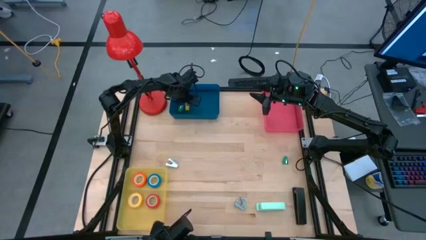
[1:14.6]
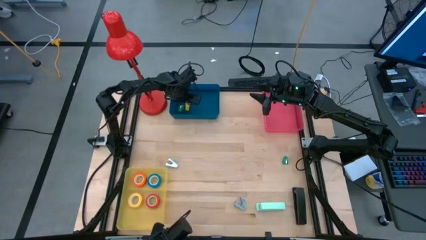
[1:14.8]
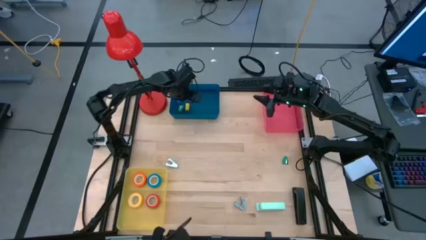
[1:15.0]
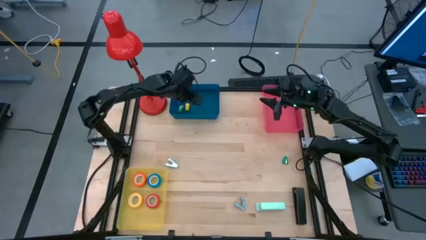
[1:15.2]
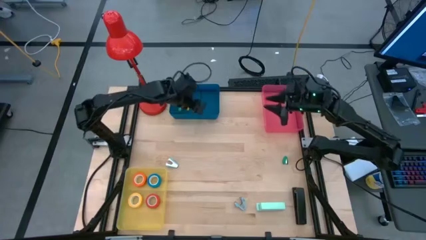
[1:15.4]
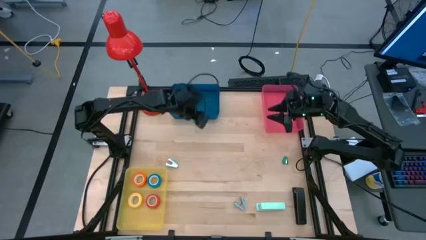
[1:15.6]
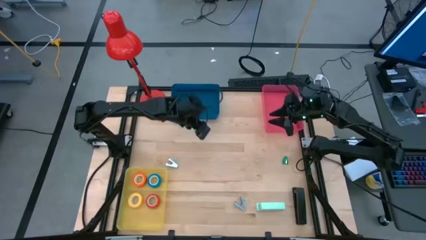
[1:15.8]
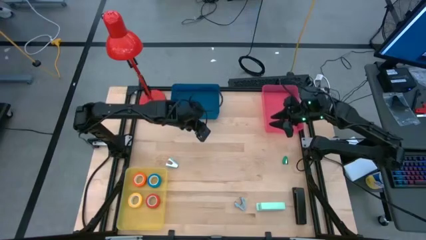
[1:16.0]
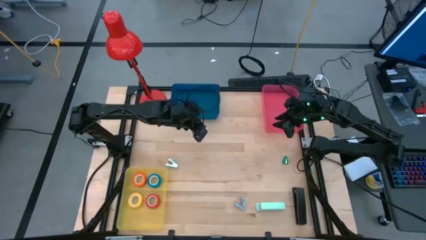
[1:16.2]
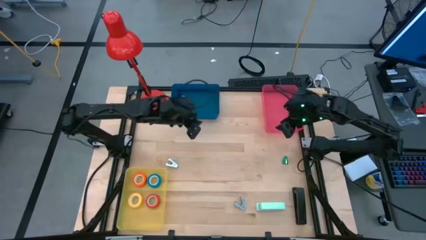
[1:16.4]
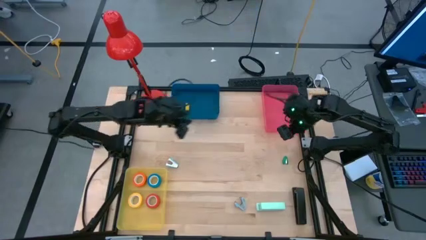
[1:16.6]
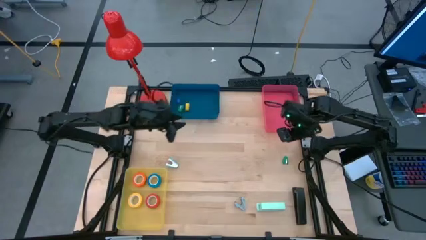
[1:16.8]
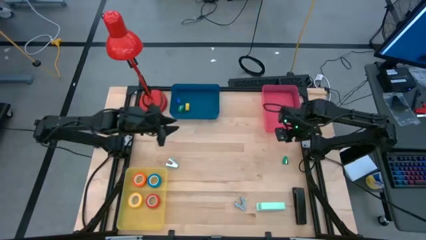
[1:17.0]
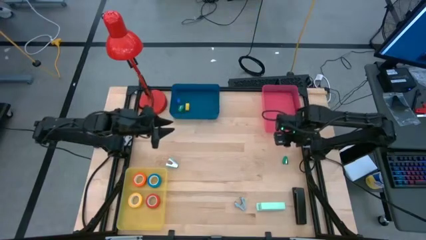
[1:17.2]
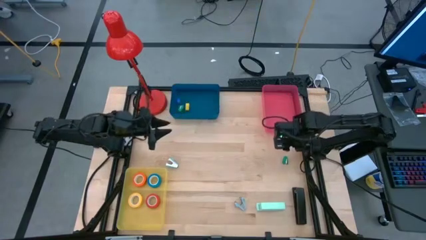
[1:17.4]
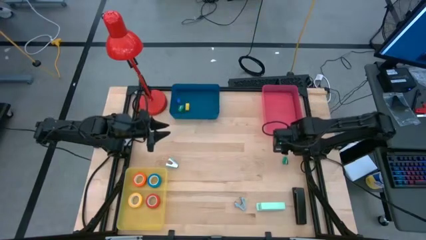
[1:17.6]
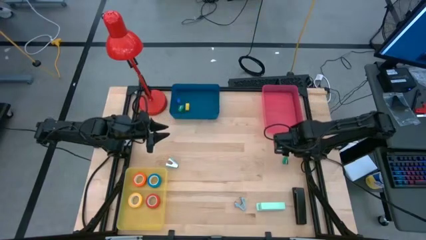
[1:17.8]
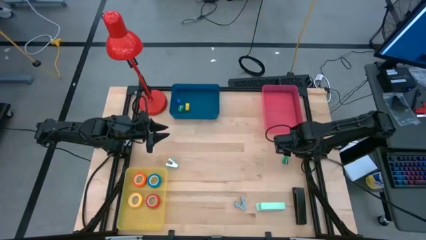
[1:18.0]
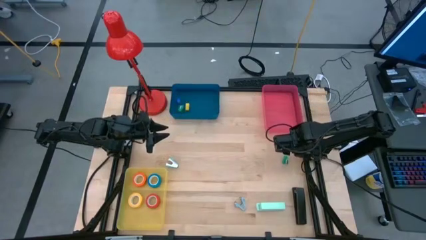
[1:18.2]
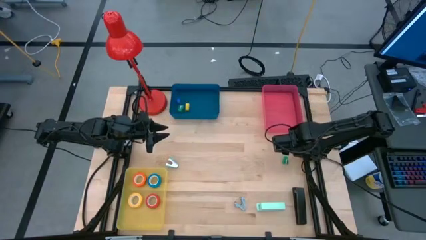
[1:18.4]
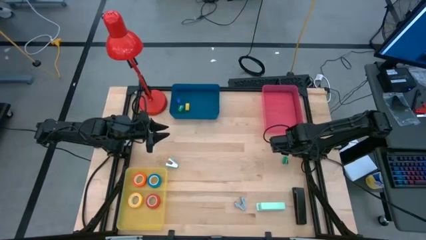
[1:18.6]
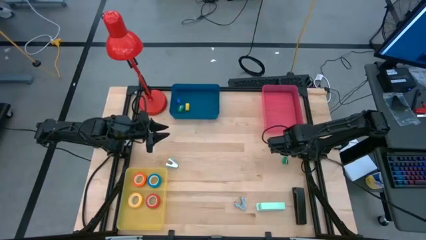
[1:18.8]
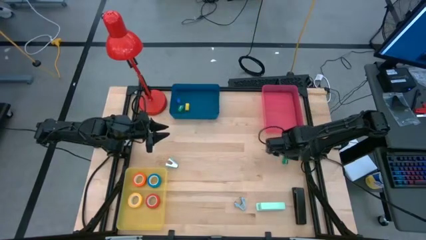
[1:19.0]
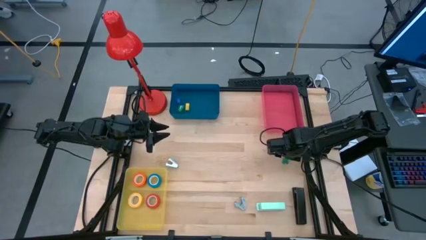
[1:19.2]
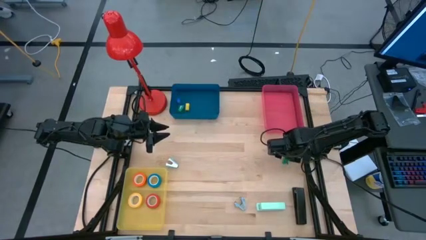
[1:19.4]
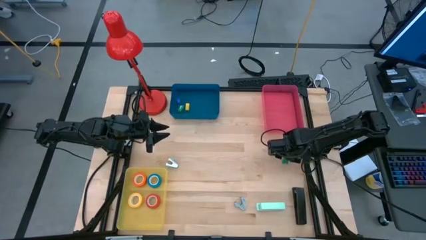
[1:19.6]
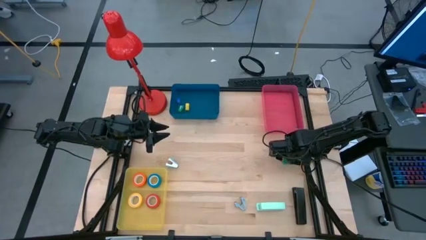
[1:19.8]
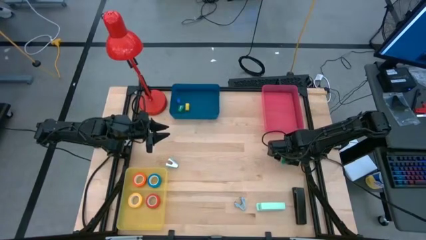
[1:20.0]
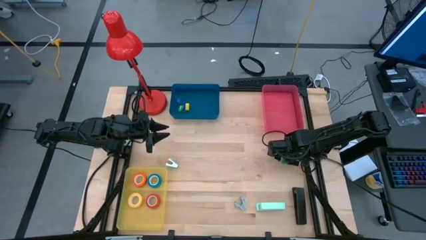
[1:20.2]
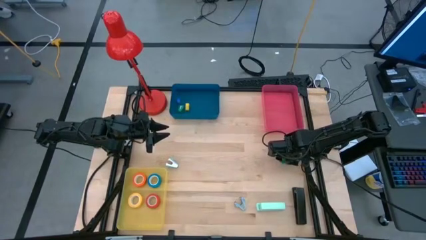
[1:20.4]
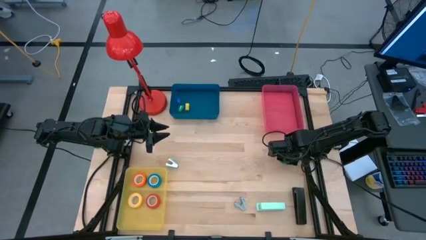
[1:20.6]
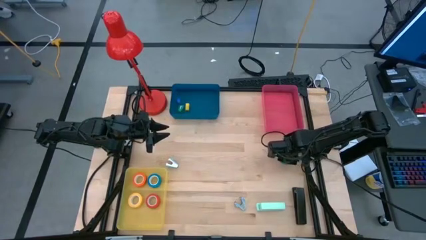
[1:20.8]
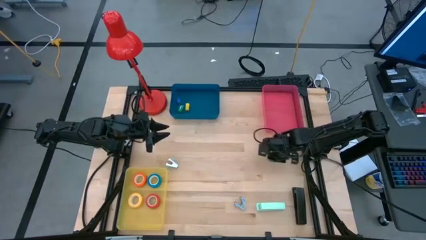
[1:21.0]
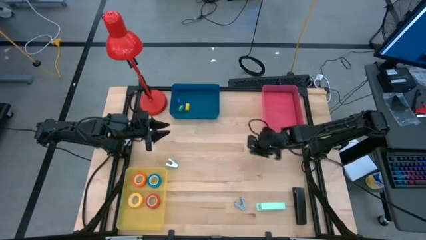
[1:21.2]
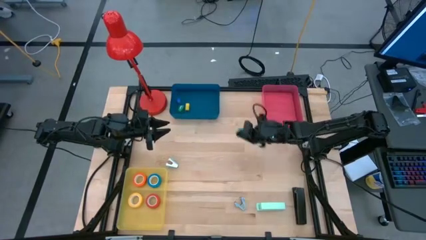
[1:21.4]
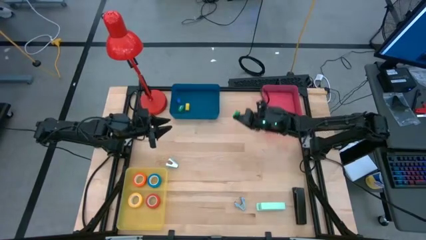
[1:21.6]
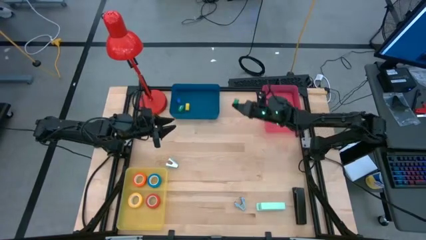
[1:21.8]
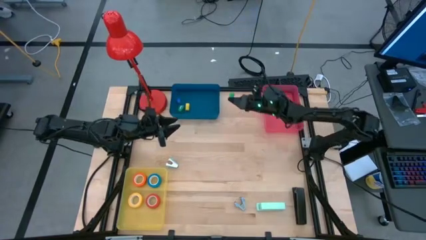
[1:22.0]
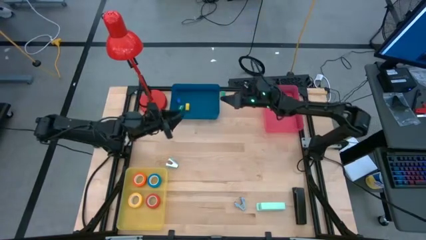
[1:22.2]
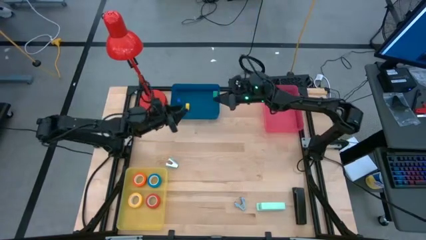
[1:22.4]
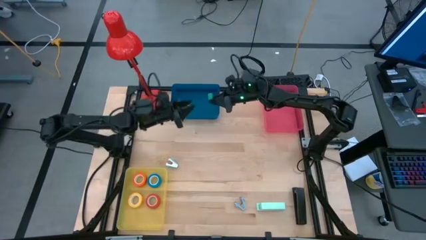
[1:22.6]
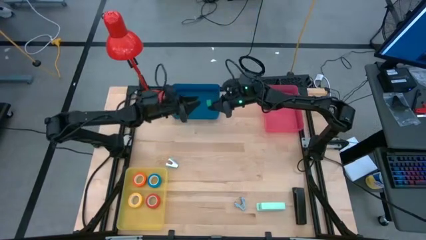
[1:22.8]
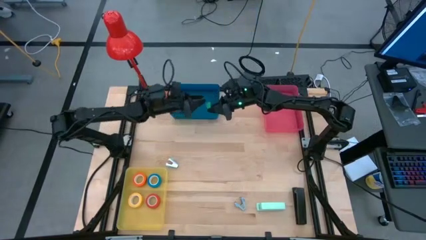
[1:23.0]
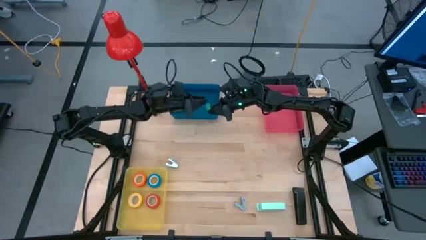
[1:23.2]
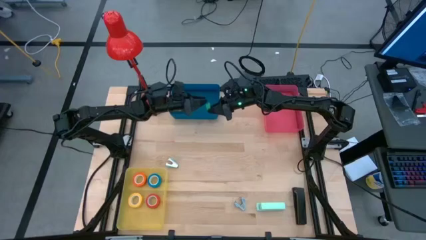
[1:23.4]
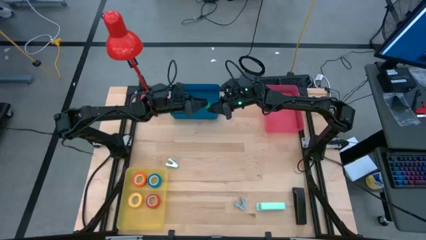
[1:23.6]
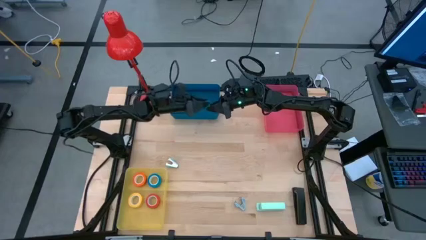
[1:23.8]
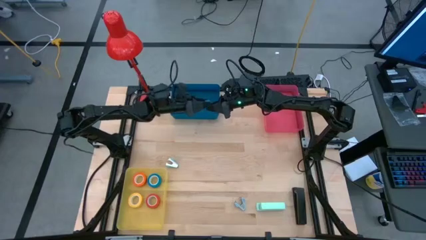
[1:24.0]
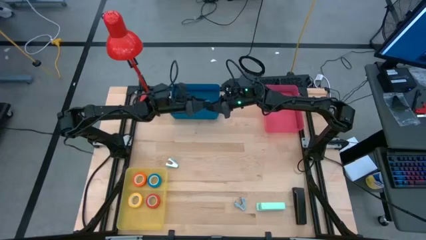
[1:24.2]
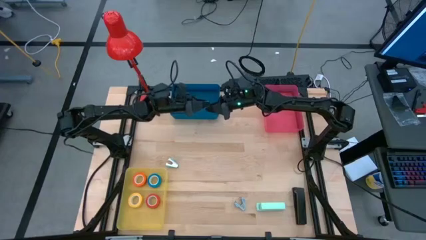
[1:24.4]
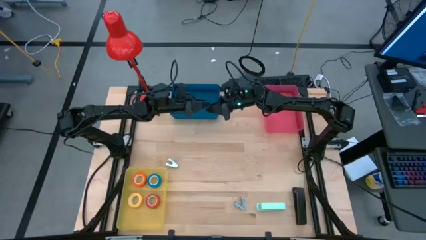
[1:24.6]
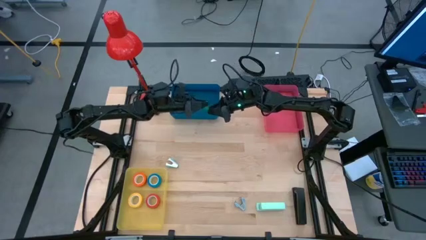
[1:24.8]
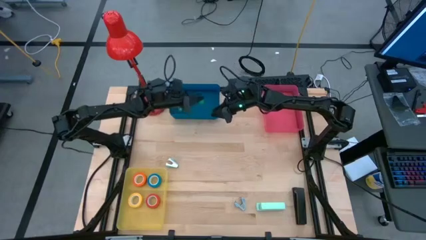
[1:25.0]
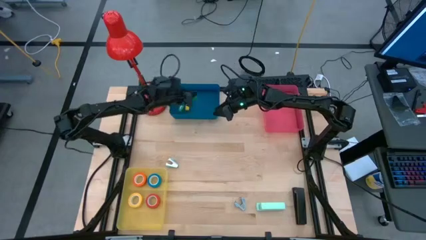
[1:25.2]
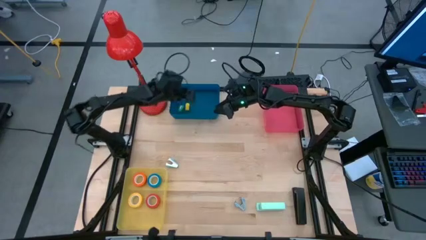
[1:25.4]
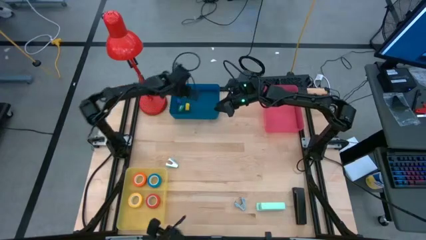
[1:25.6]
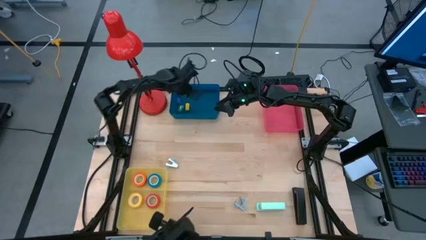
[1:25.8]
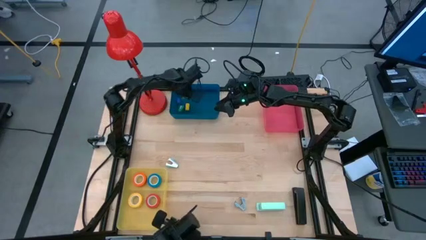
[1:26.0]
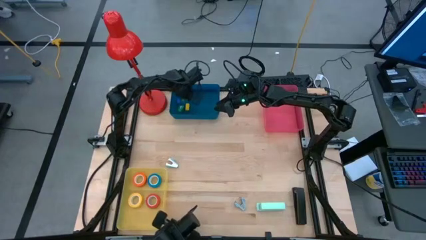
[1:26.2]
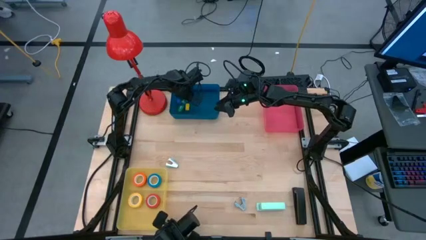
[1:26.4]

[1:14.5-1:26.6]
Task: Pick and place Stapler, Stapler remover, tape
Put the green stapler into the blue bin

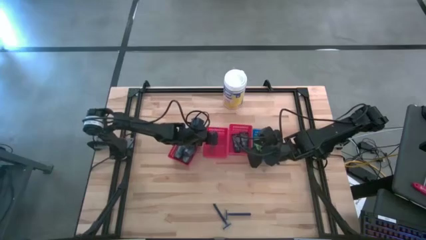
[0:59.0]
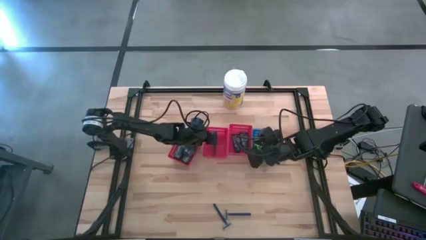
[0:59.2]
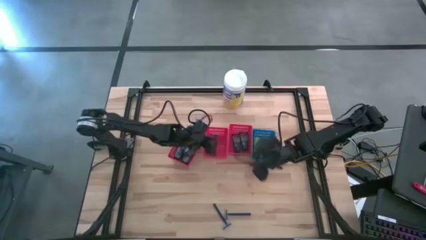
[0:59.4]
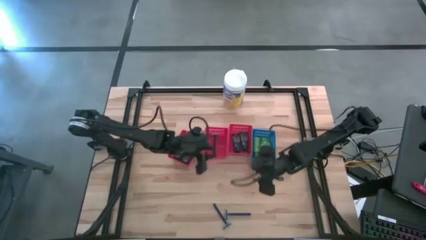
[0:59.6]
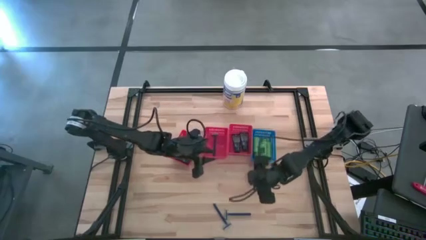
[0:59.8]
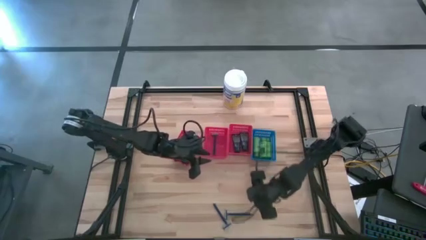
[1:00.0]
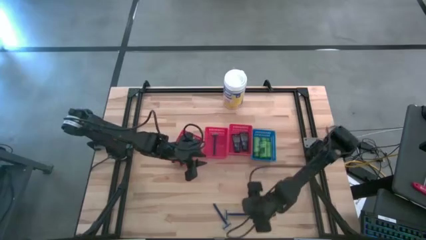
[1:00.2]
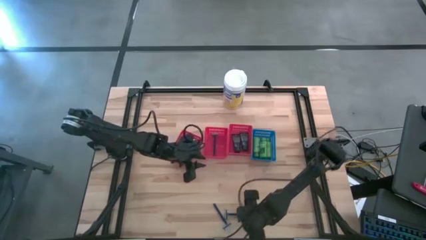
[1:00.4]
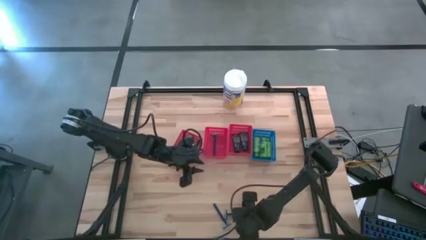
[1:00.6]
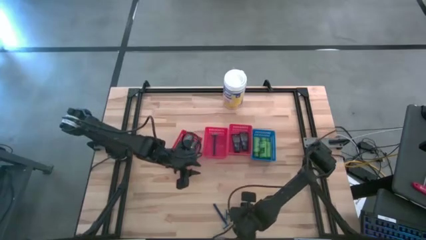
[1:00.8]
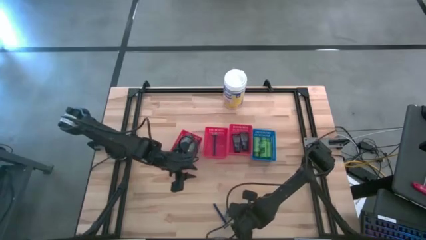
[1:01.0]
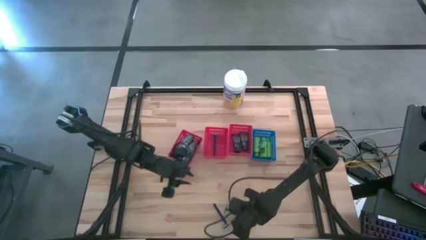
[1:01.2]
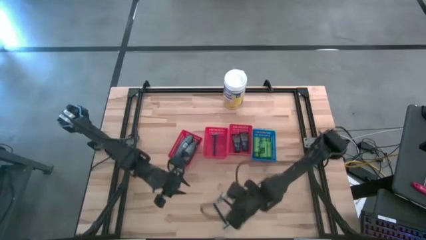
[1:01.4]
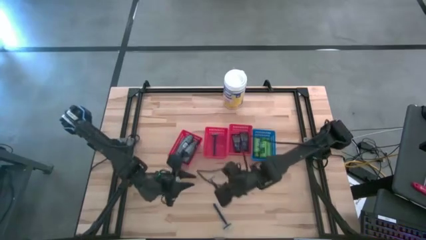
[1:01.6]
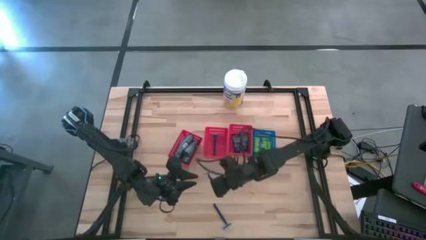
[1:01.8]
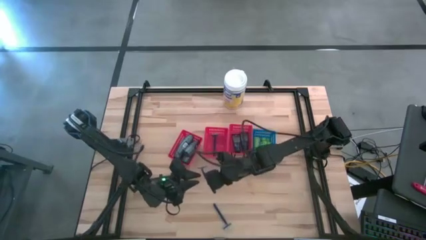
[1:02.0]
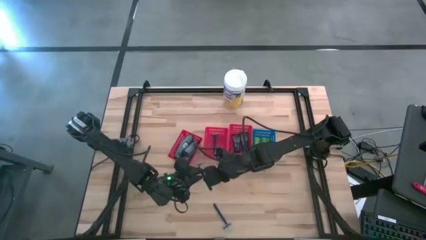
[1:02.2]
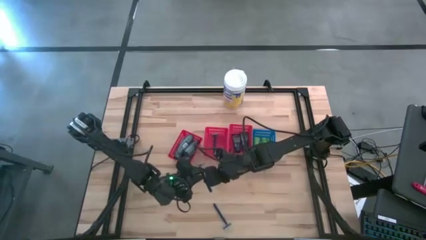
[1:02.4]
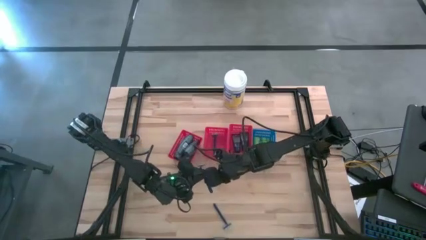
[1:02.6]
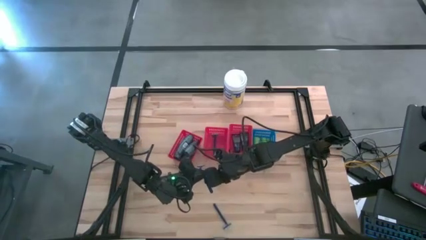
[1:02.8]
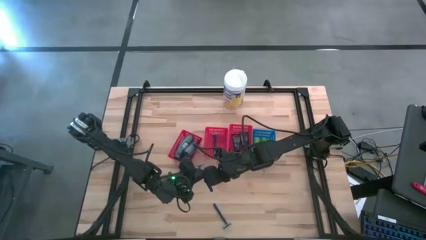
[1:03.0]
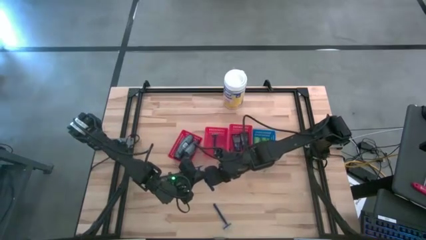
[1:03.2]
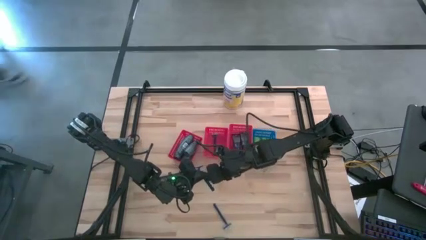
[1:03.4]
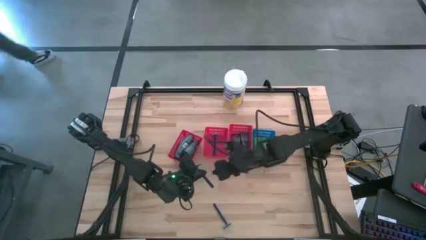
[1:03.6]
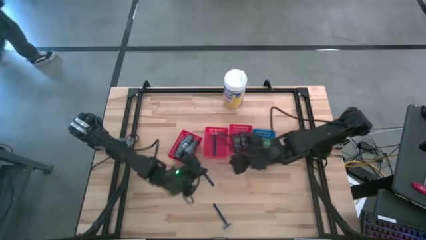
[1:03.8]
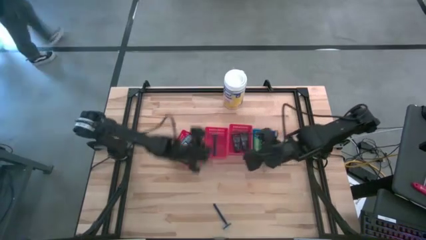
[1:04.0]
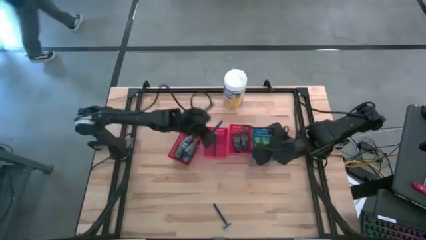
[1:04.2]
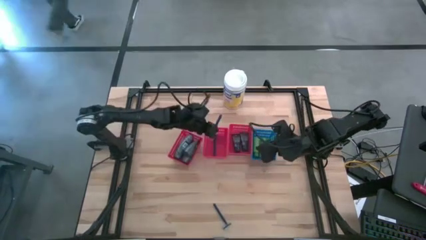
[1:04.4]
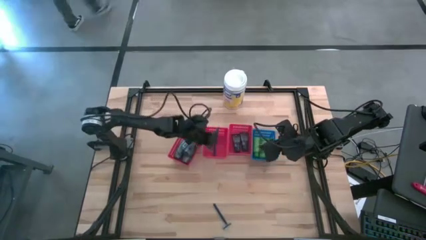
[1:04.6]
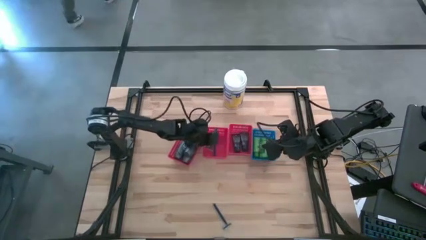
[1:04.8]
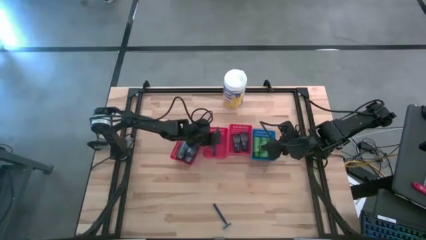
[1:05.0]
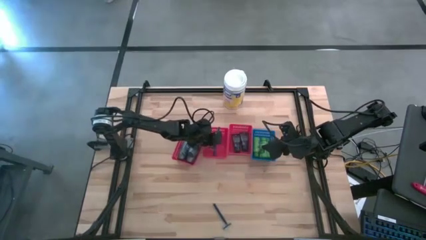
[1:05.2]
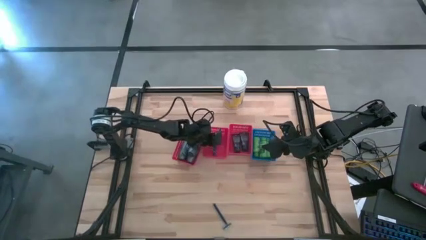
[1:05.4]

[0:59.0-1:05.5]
Task: Pick & Place Travel size toiletries
Put the blue razor into the middle red bin
